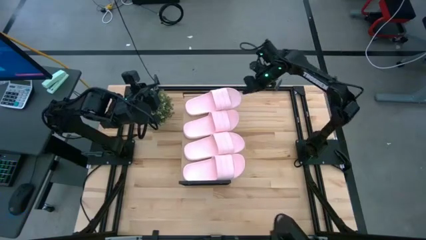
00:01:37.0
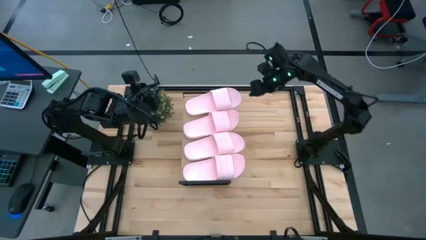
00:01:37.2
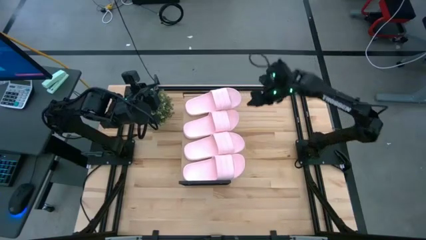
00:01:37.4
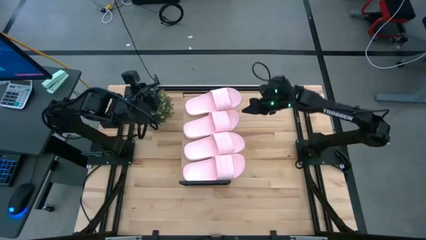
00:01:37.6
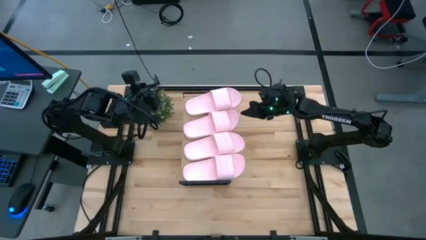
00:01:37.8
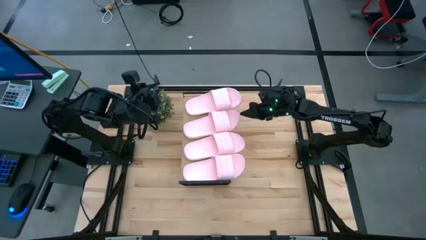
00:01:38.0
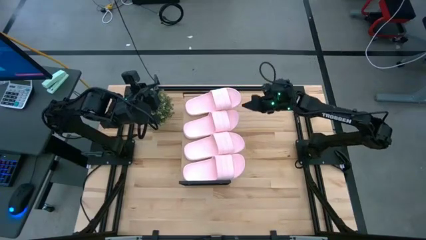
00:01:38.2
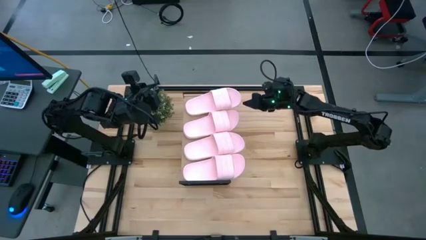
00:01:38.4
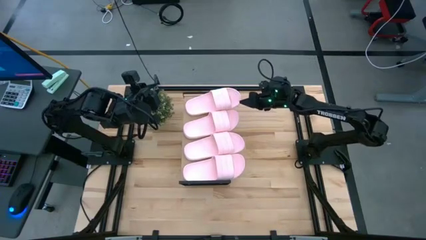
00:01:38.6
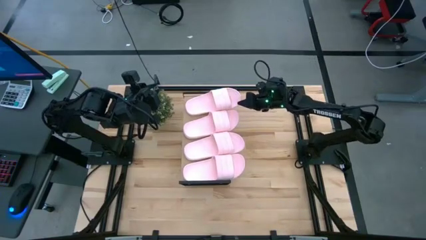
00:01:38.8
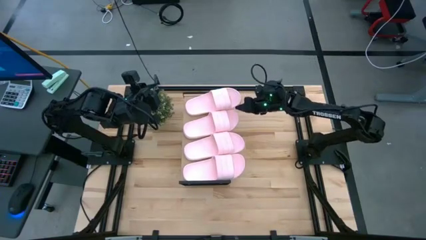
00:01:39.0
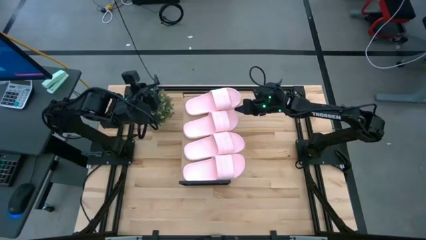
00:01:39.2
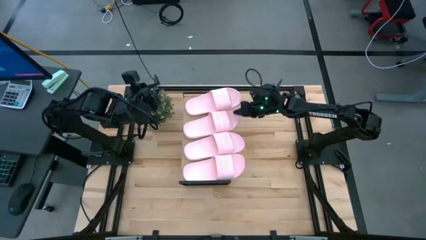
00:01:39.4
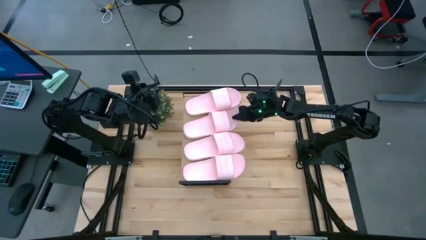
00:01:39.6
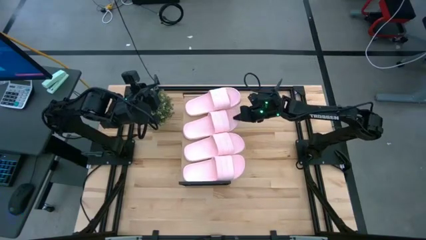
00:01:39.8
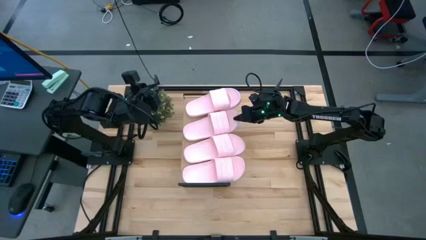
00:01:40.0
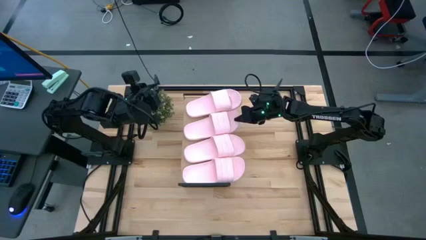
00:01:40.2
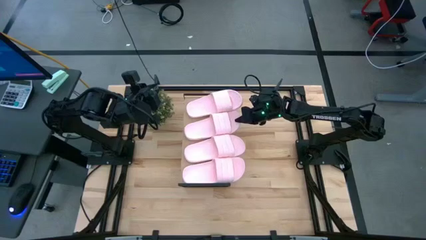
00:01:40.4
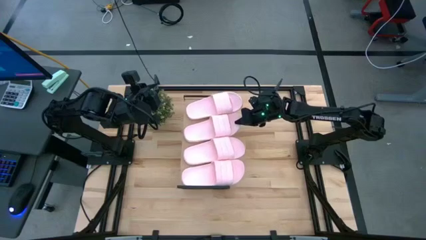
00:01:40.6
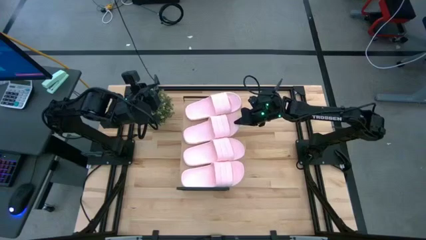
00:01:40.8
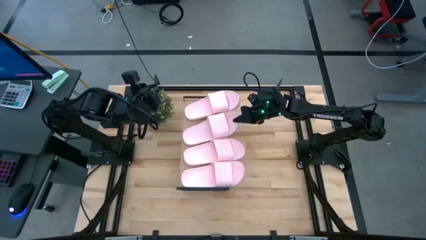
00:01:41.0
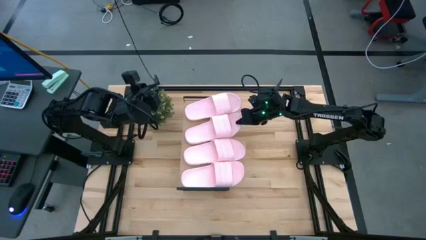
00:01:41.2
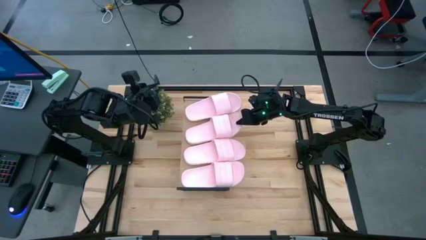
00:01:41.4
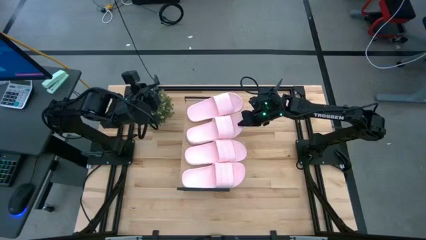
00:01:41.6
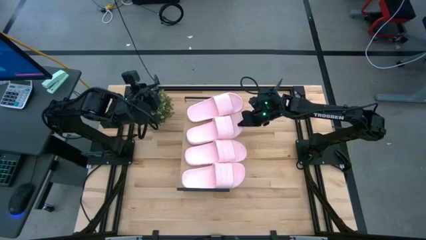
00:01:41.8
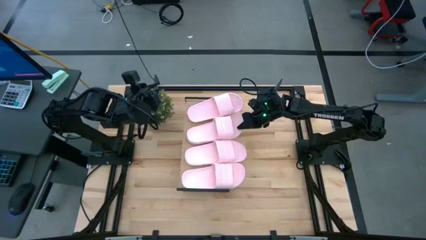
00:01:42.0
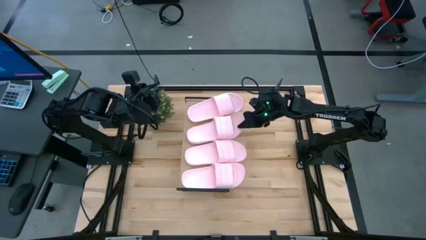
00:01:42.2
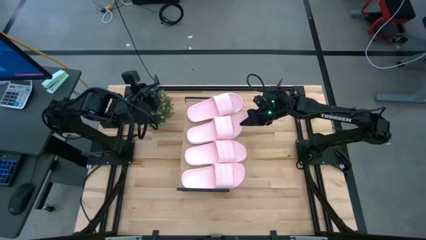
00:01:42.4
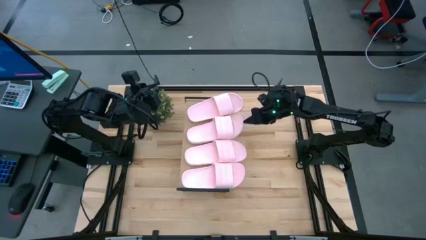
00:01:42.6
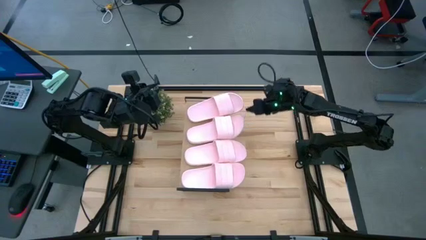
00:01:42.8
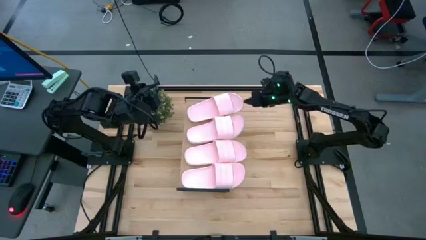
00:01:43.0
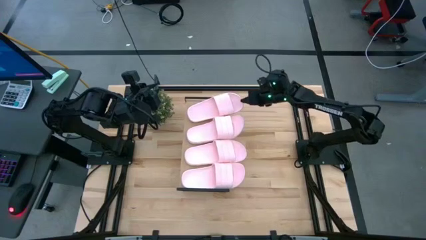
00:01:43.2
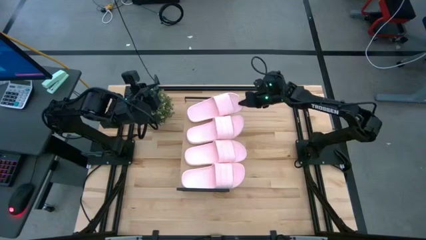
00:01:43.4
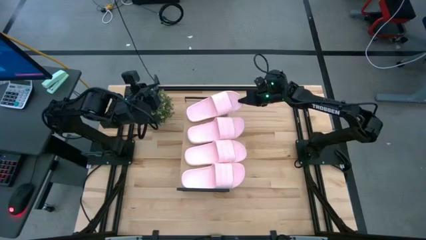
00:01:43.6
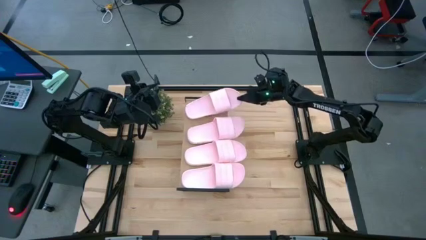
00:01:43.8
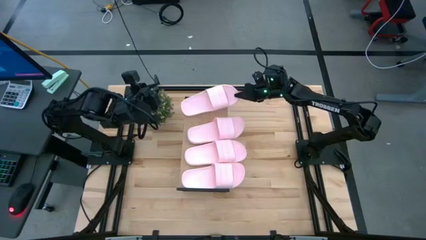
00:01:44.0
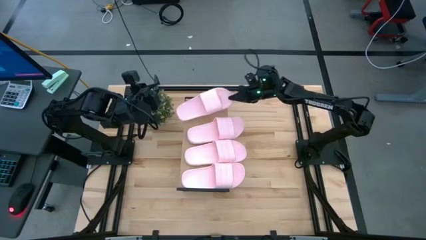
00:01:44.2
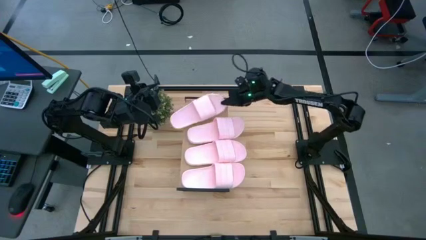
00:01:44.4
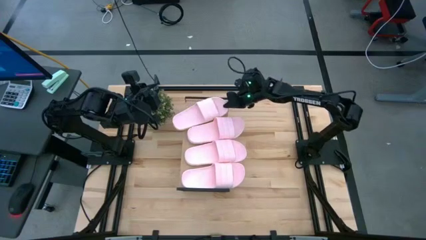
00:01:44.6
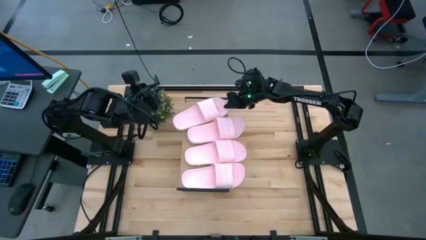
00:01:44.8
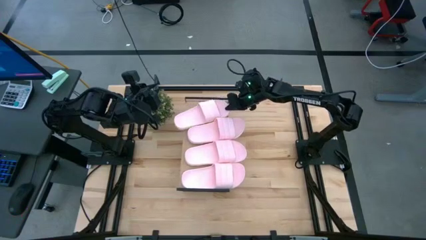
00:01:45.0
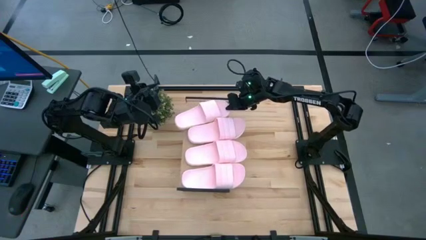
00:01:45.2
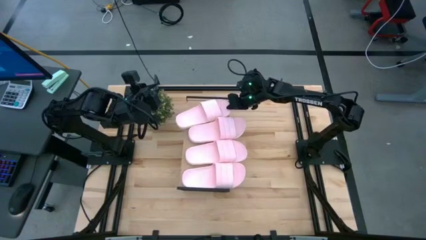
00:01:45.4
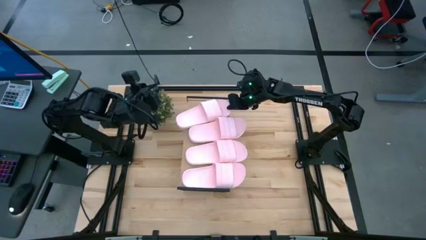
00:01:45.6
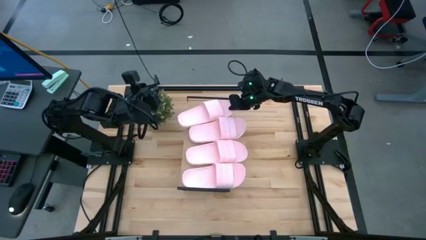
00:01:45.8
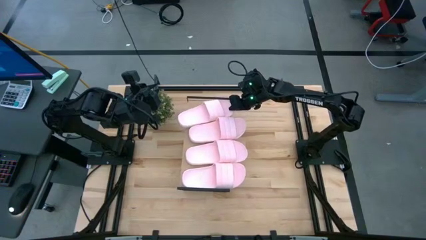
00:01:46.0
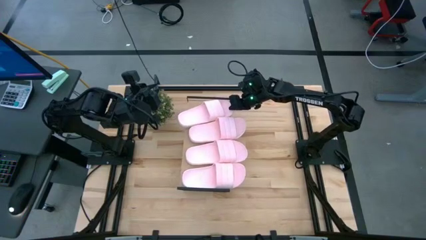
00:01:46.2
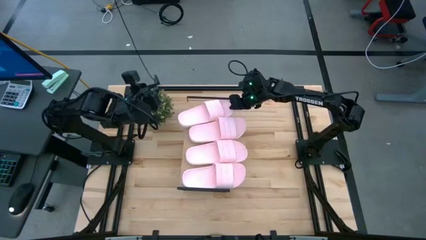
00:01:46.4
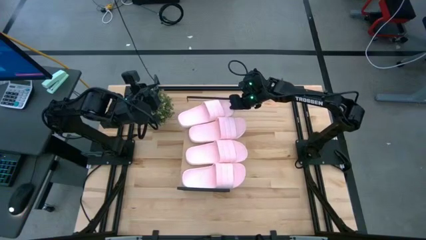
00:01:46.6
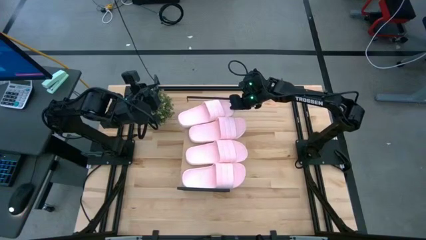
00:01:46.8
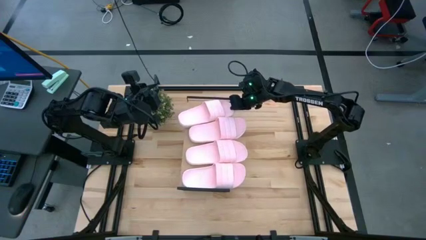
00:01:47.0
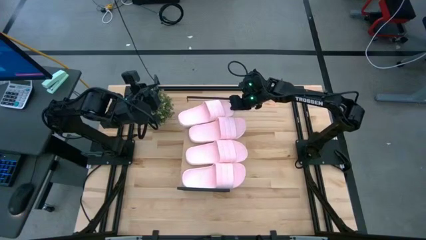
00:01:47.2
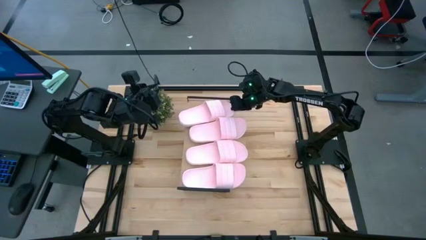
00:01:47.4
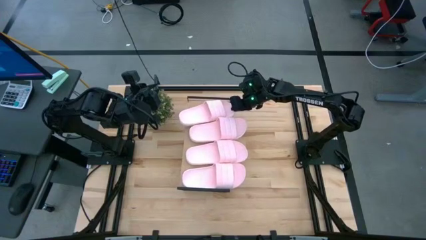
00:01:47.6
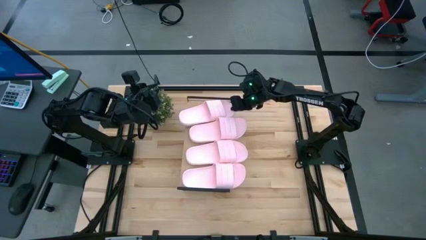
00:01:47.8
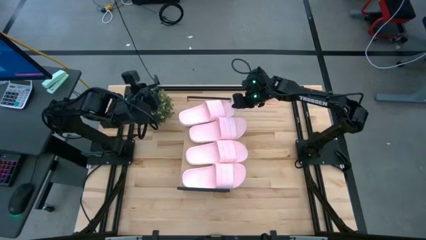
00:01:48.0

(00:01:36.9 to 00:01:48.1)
Task: Pick and place slides into the shelf
Adjust the pink slides on the shelf

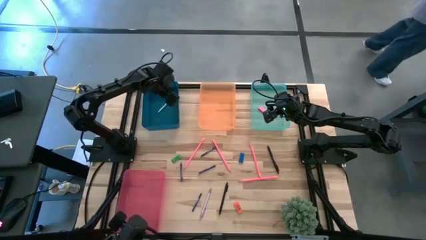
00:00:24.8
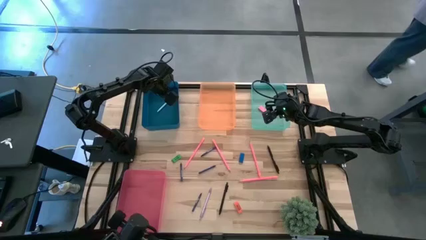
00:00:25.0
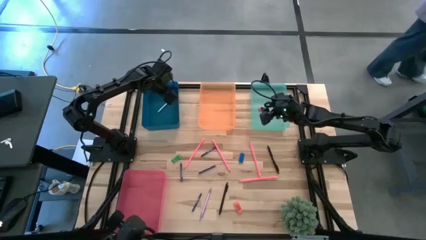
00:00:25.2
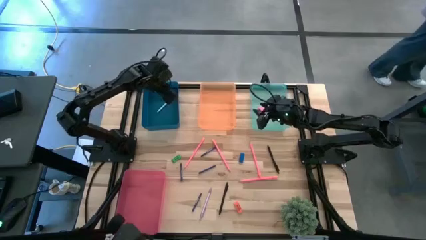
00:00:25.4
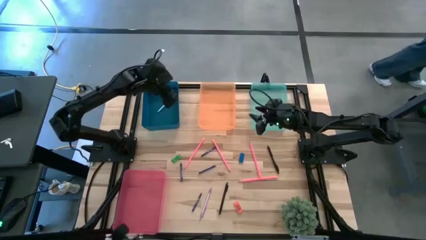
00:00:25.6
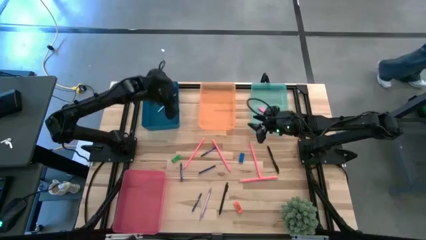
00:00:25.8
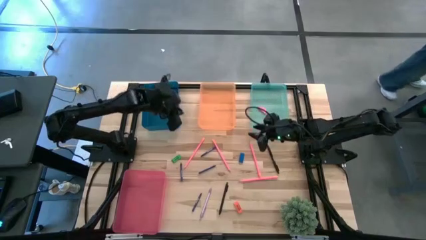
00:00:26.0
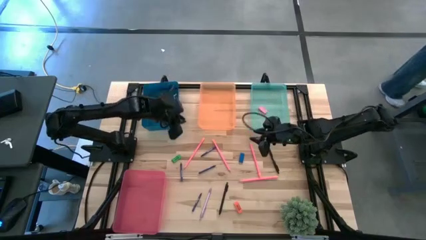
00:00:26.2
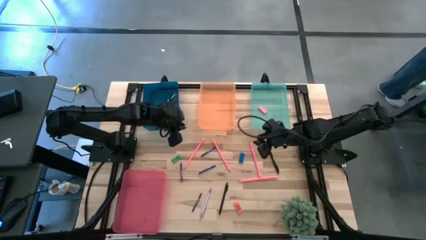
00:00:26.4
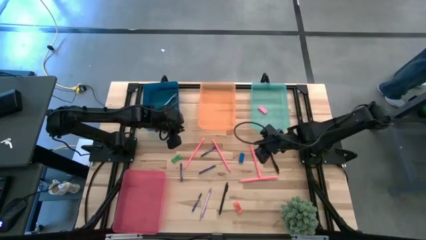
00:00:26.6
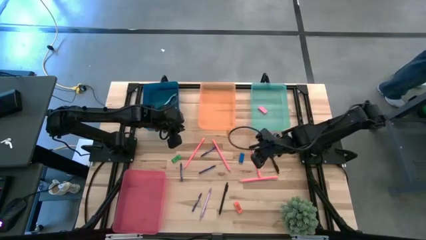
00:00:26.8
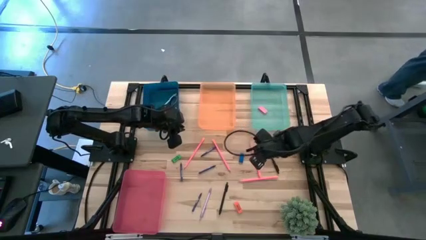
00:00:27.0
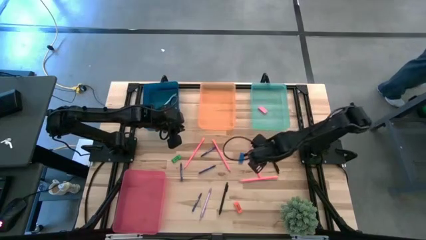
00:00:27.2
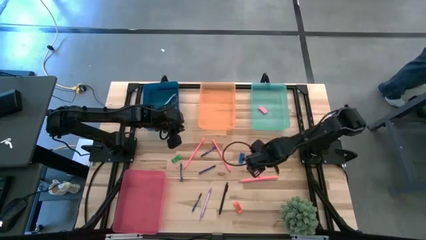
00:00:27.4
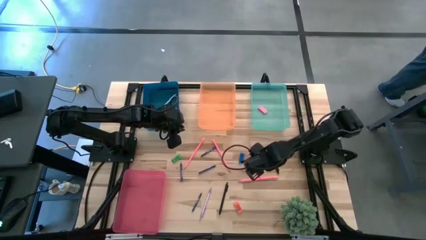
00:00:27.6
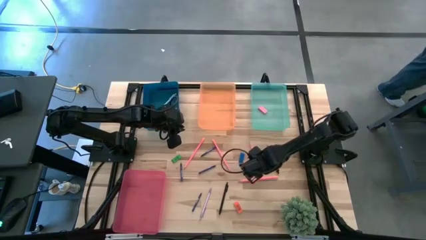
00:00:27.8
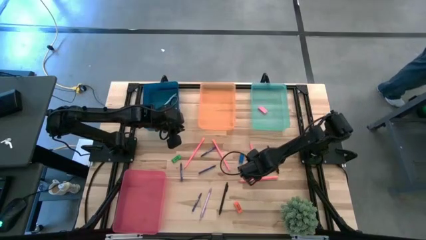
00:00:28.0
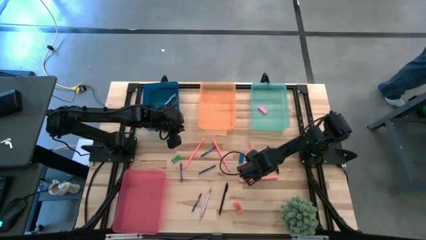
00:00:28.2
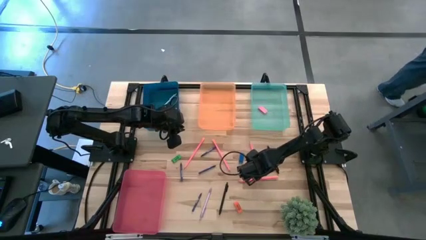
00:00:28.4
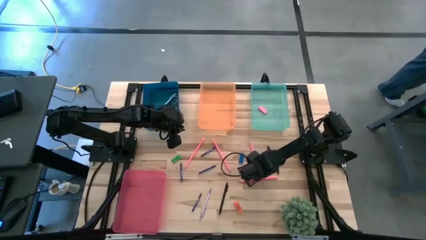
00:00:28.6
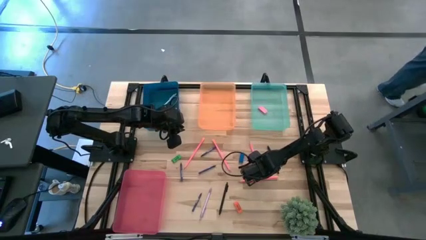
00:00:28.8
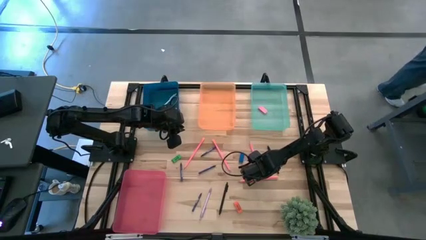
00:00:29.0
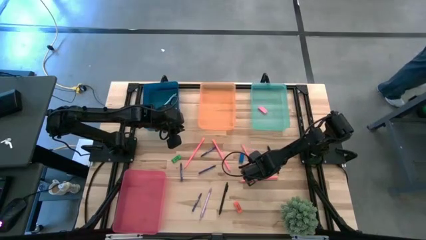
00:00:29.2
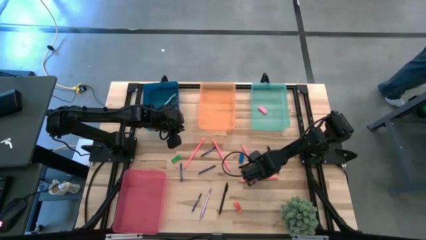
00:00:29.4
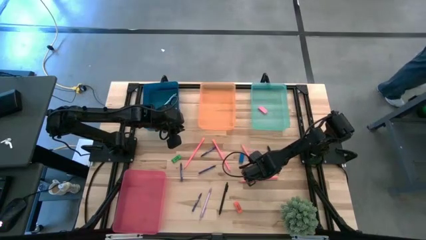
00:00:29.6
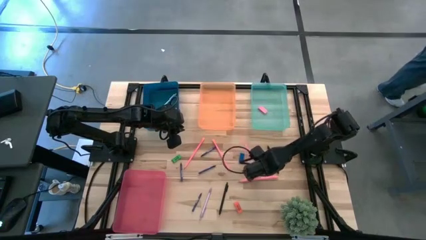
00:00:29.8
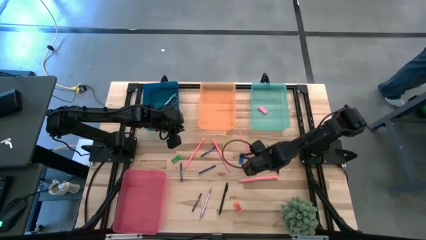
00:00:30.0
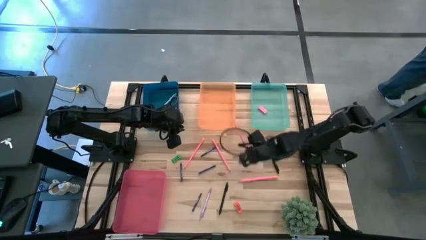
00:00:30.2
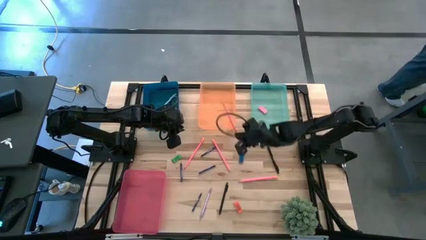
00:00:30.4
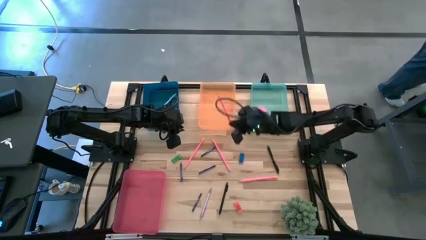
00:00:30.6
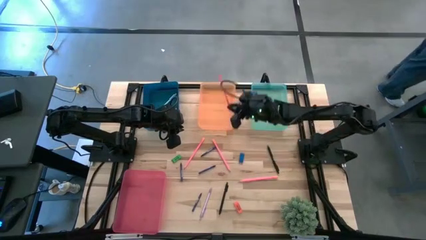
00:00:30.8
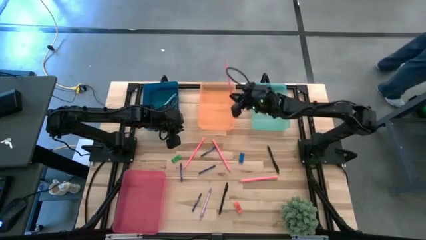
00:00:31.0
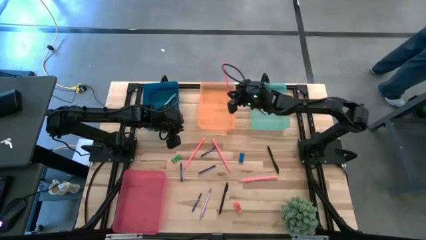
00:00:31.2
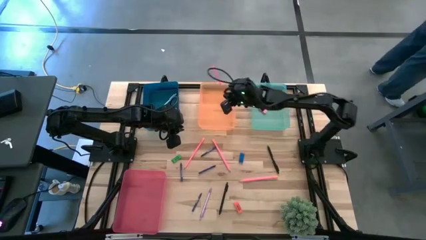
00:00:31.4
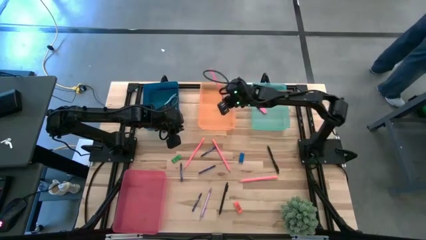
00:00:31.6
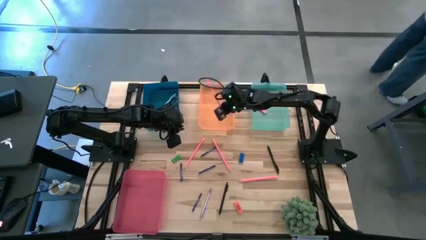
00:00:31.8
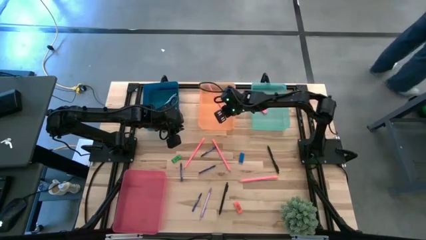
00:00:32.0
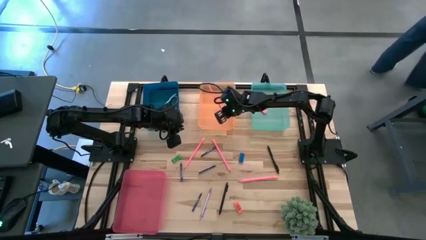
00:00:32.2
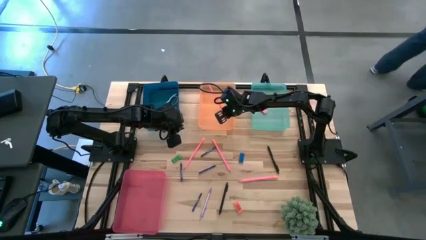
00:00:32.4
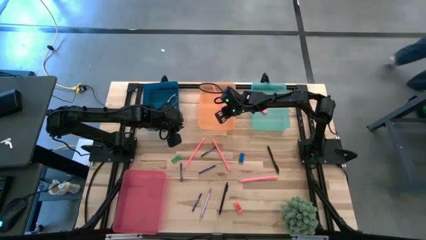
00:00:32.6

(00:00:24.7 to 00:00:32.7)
Task: Sort crayons/erasers/pens/pencils in bins
Put the pencil into the orange bin
